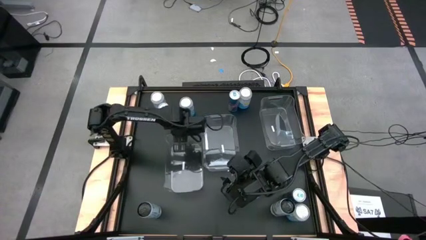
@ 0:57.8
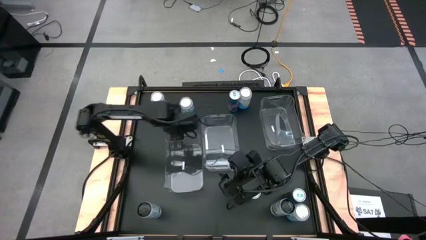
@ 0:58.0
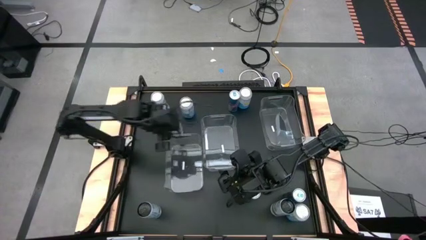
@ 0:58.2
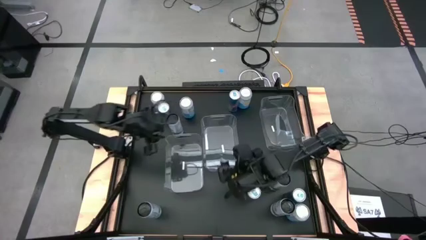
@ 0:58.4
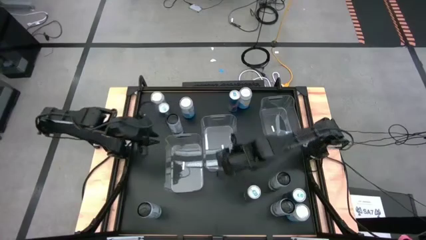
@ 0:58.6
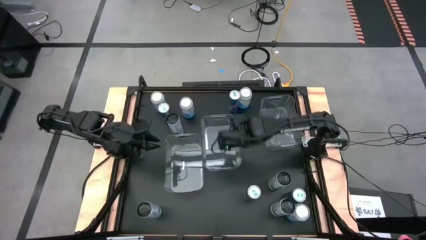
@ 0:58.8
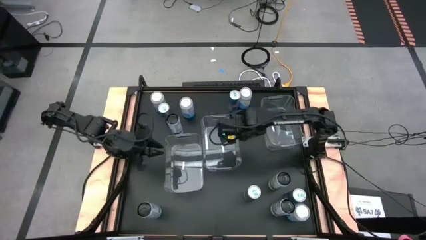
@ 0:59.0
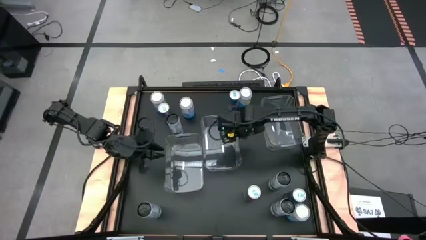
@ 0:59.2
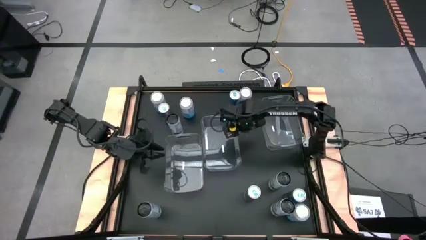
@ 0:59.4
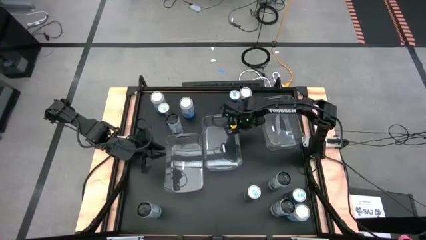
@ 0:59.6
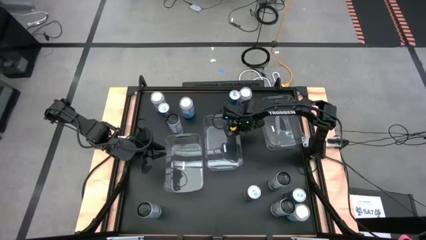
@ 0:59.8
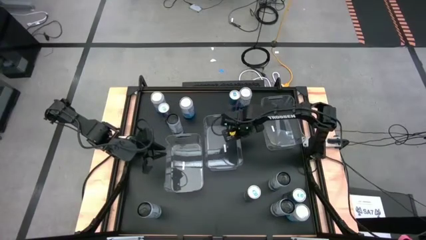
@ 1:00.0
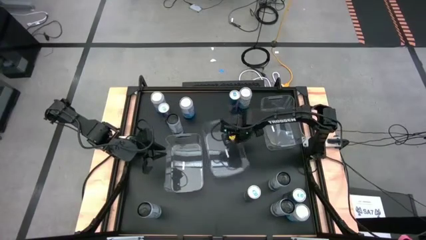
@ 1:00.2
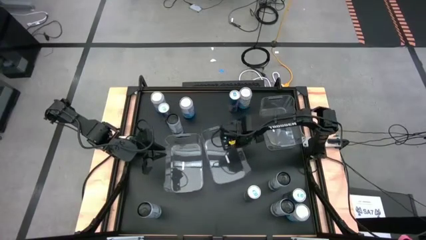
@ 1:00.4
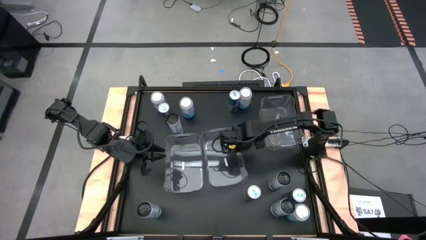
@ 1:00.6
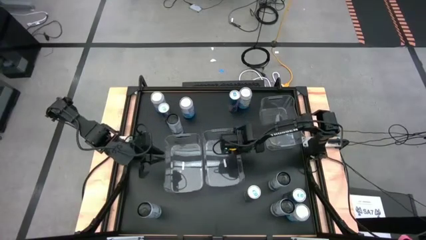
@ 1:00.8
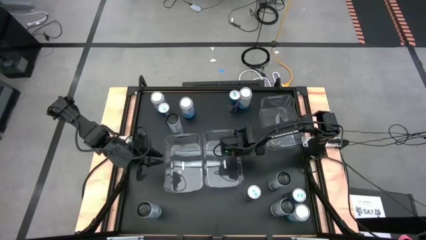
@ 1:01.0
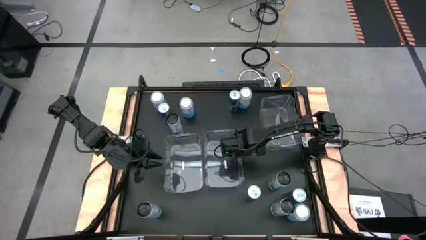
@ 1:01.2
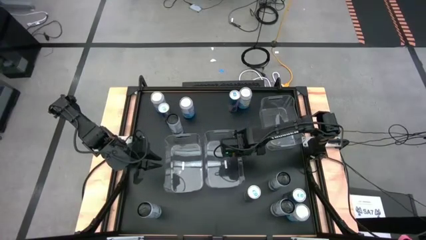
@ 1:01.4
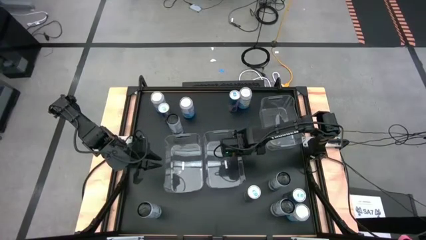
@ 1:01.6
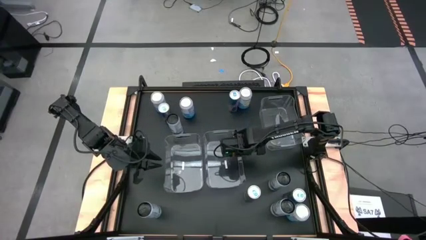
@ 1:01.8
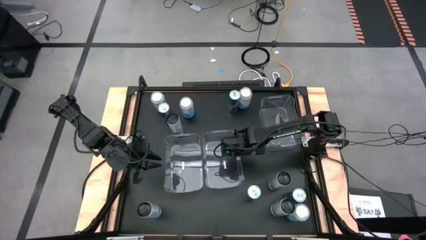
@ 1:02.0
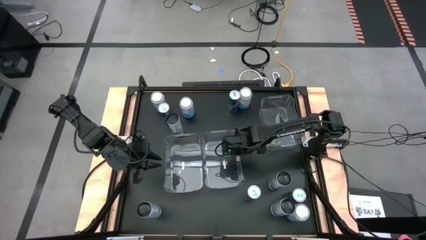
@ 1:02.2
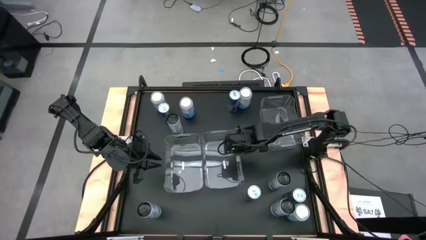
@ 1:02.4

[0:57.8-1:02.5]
Task: Sort soda cans
Adjust the middle transparent bin

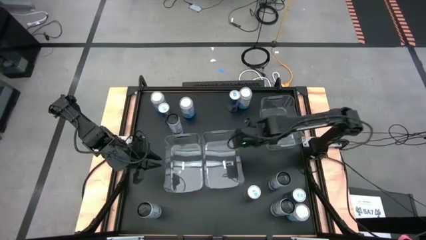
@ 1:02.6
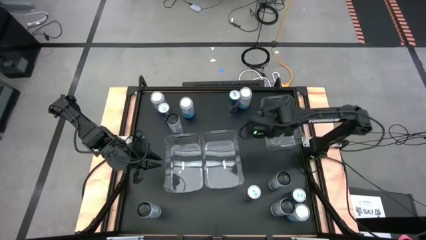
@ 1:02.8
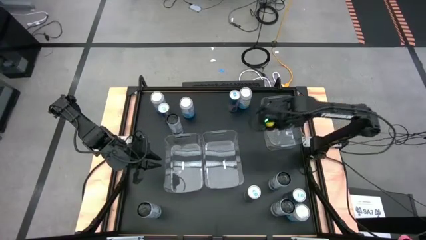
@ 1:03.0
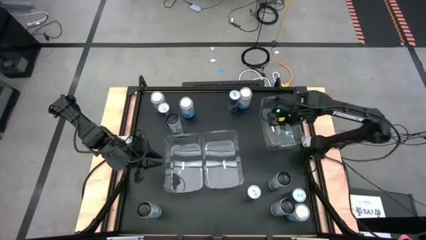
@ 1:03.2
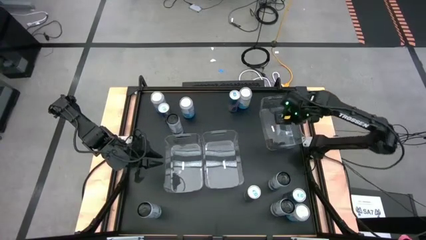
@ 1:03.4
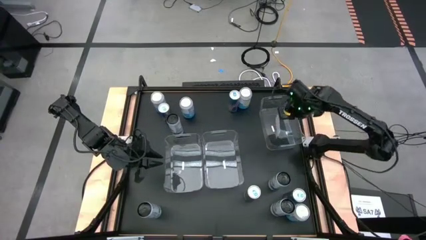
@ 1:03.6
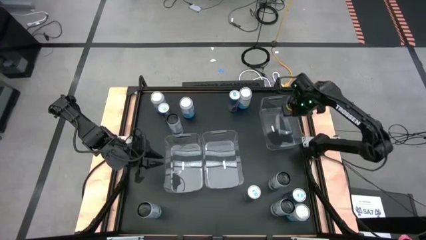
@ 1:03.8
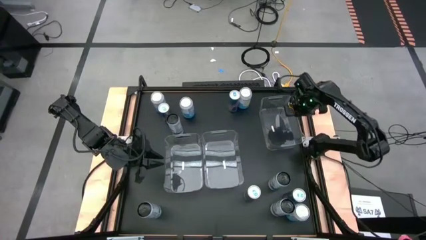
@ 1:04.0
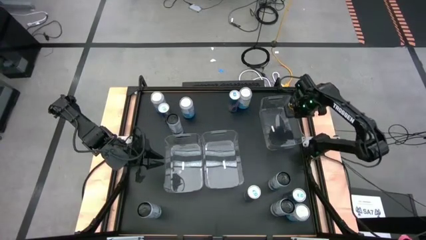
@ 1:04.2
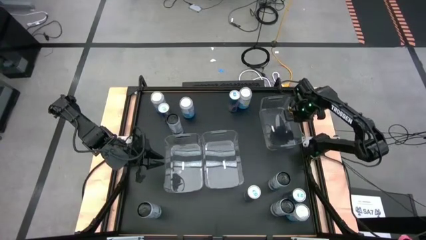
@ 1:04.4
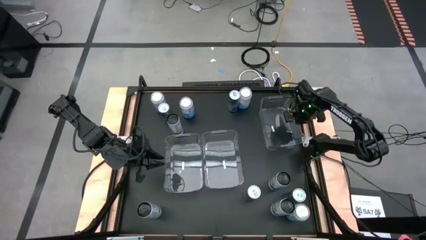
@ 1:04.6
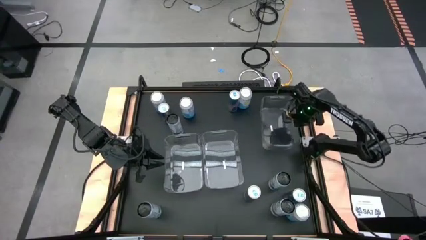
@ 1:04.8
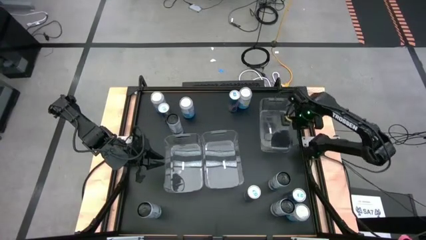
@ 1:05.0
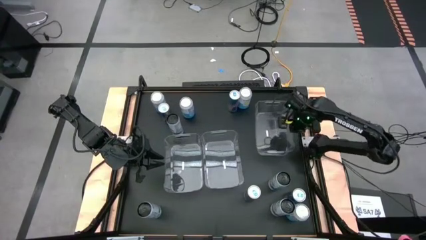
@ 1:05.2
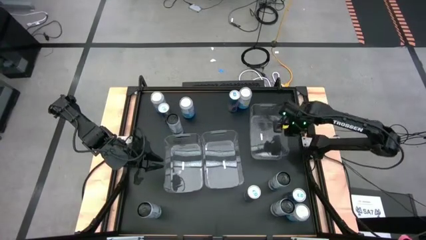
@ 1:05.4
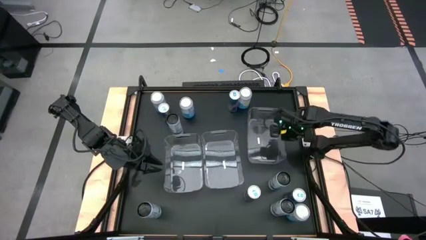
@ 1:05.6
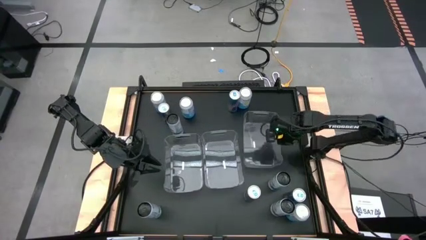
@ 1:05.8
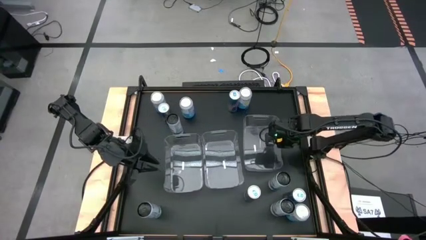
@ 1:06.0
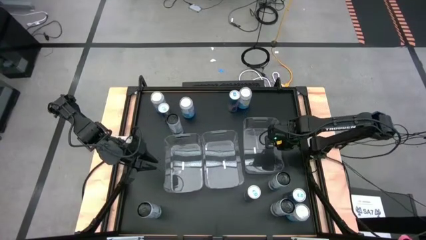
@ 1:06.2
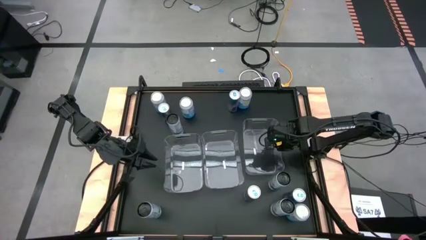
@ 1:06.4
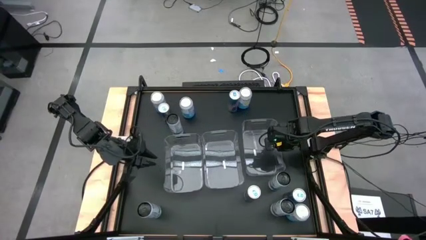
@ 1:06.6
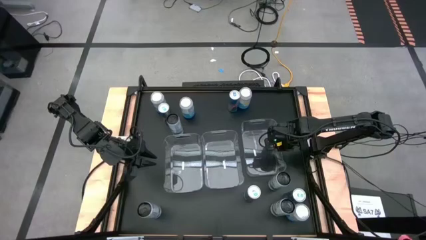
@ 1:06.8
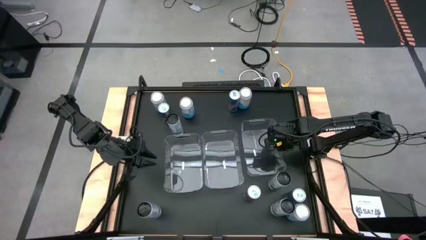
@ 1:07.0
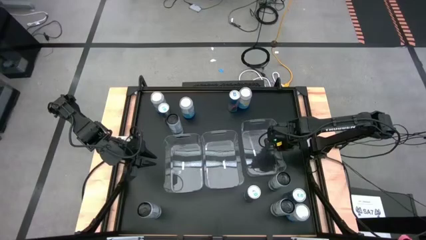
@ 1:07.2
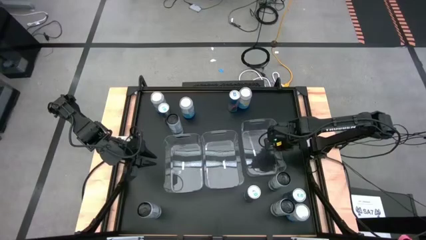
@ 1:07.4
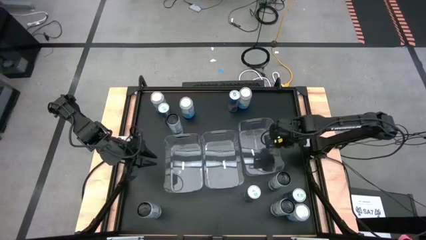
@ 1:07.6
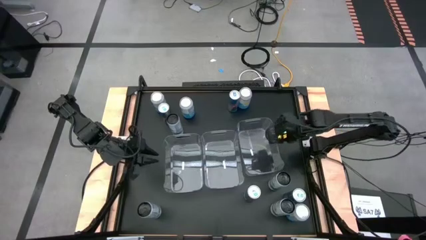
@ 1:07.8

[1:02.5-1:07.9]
Move the right transparent bin to the right of the middle transparent bin

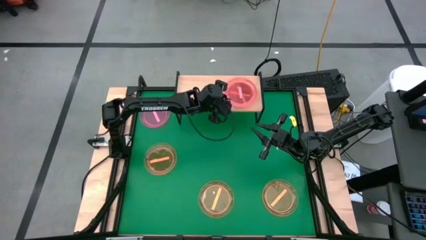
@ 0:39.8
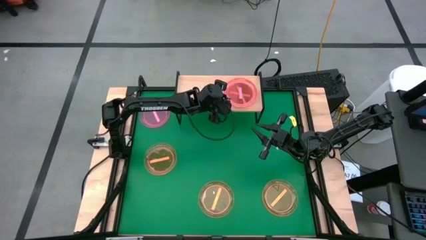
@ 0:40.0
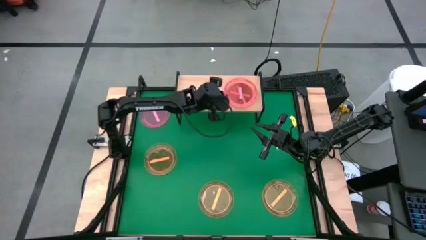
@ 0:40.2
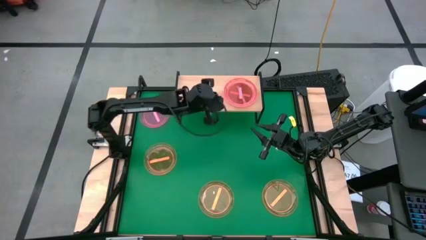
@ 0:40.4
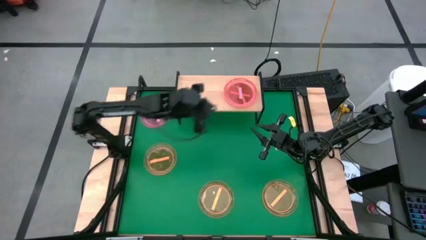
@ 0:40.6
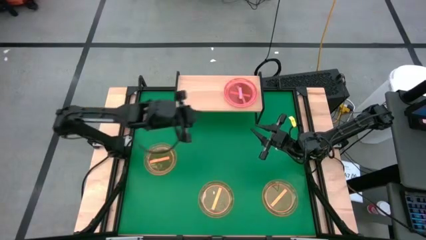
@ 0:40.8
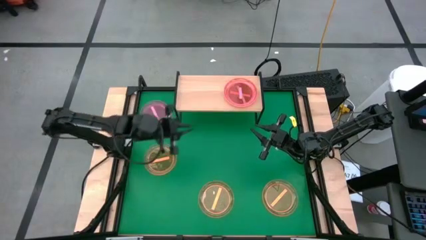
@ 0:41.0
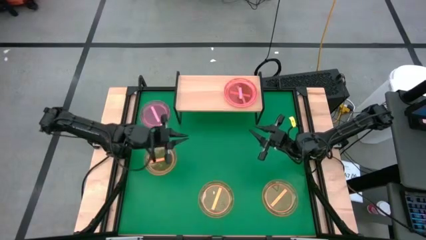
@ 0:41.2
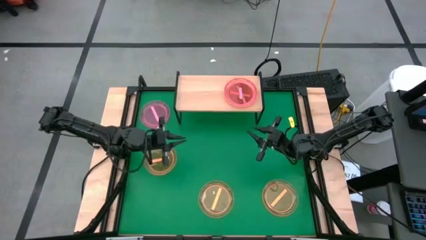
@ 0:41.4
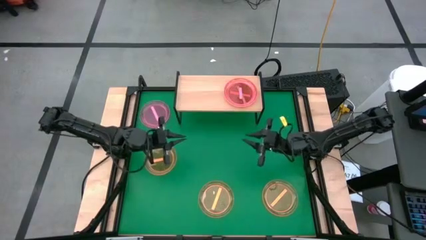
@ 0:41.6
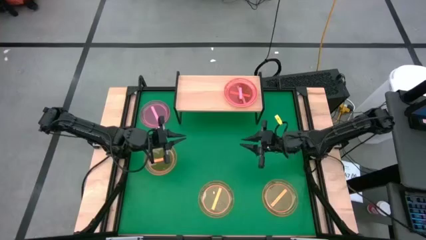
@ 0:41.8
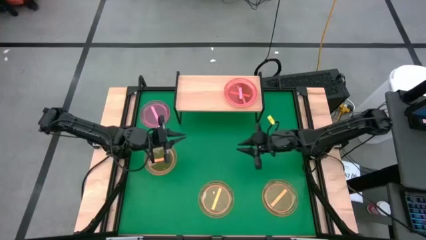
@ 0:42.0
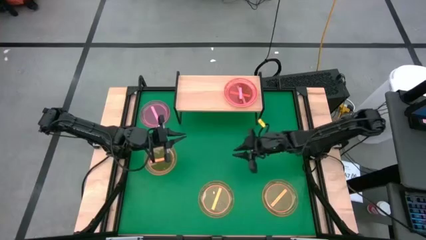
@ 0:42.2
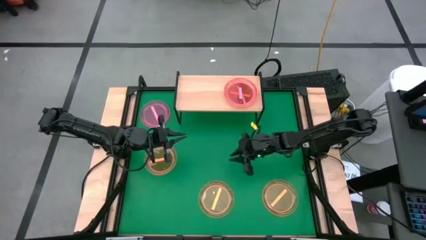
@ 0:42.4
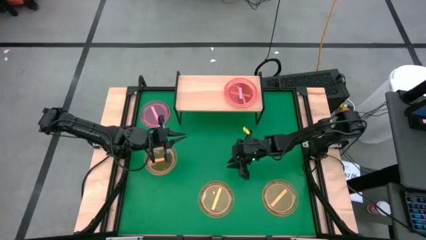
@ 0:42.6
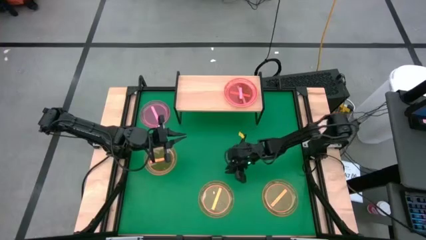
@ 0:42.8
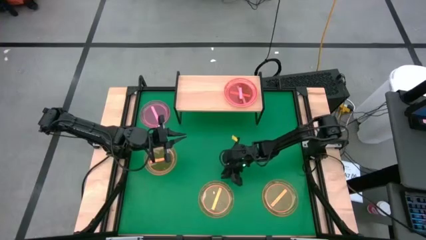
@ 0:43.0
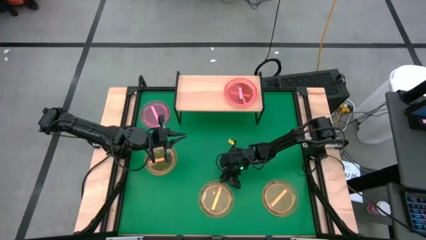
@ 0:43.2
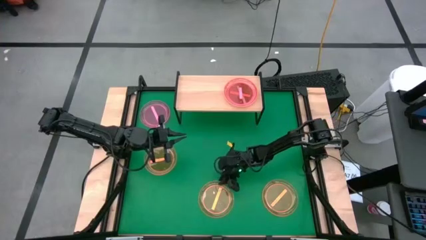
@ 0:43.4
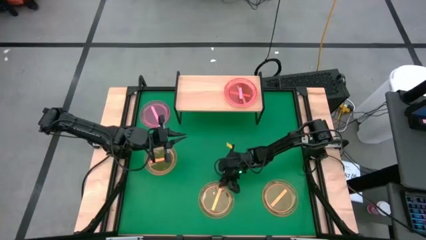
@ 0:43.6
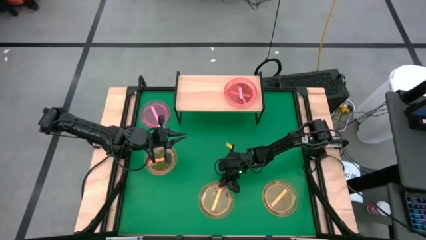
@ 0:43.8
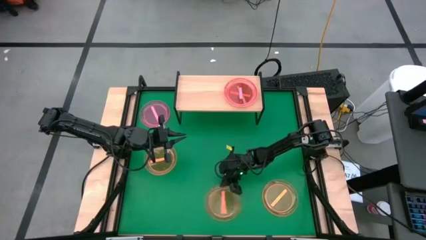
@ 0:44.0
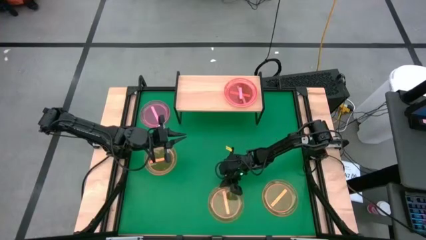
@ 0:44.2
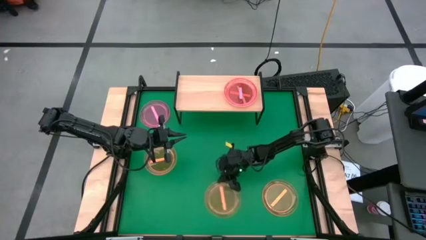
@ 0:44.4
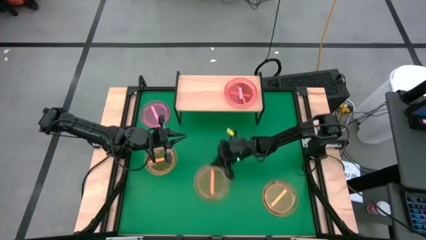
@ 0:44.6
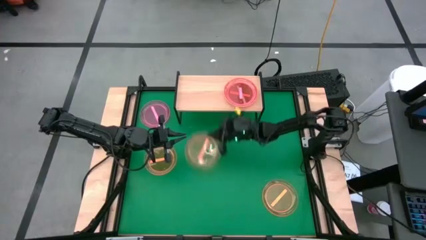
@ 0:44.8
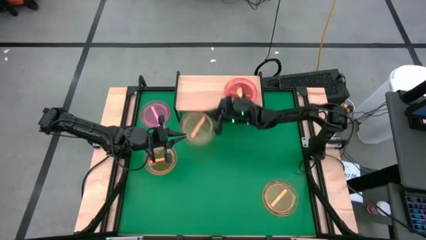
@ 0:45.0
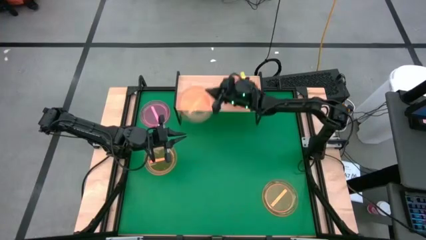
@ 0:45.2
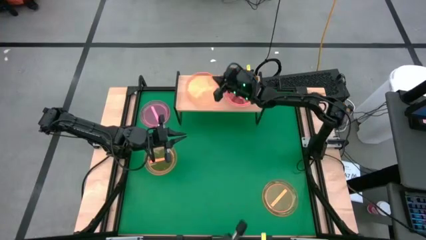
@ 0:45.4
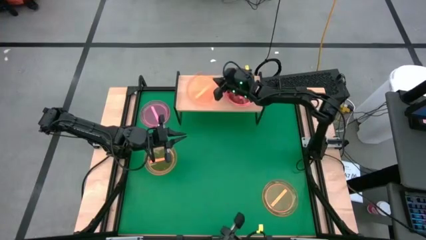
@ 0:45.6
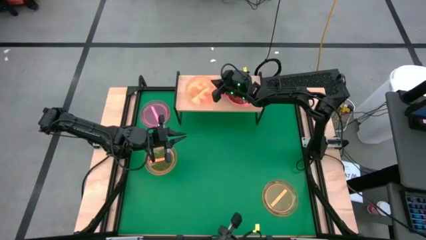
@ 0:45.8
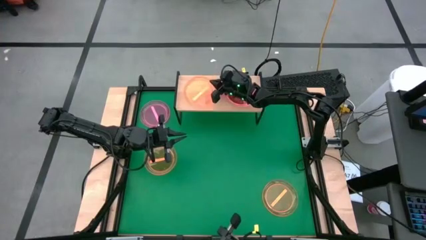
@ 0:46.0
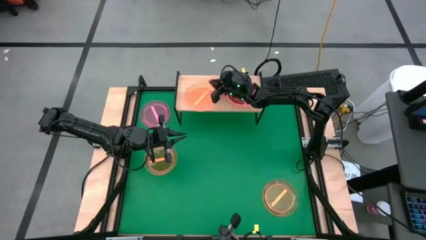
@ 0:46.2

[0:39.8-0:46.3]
Task: Place and stack plates onto a shelf
Put the orange plate on the shelf
